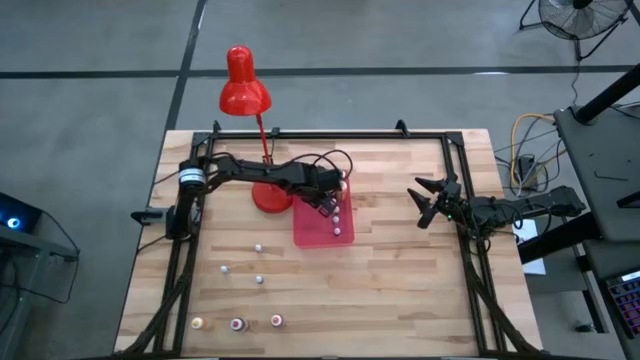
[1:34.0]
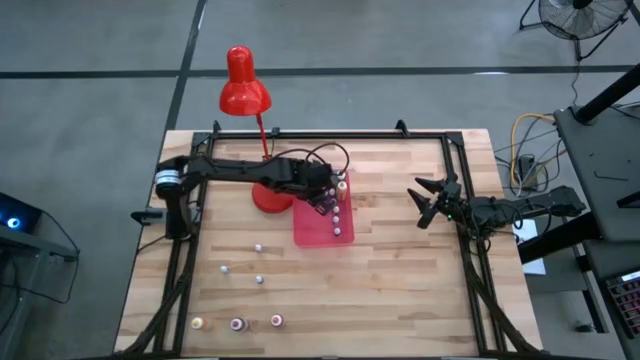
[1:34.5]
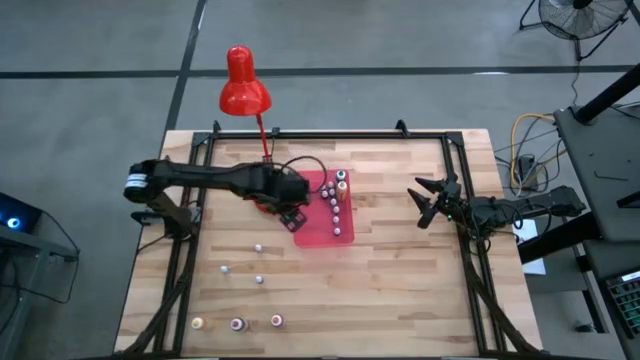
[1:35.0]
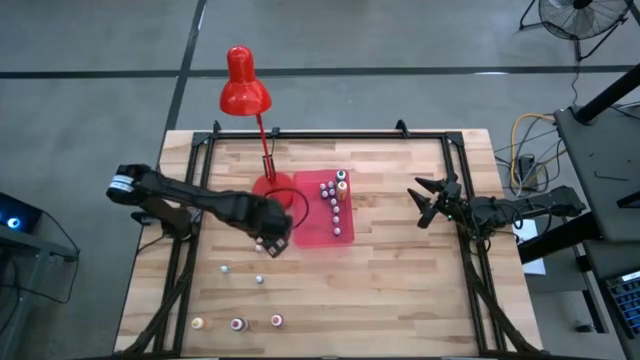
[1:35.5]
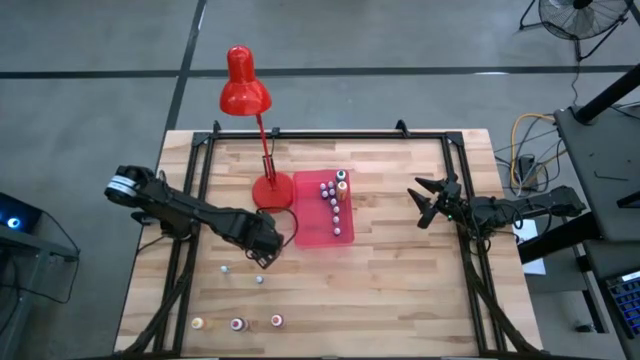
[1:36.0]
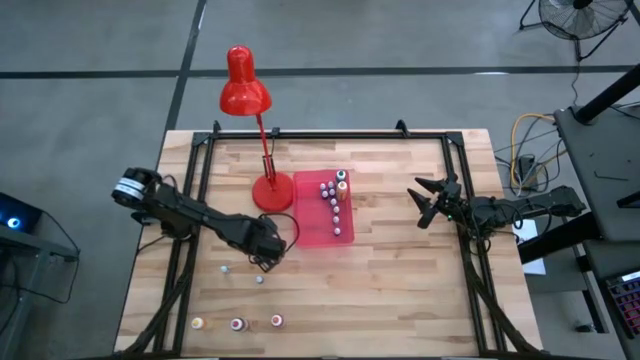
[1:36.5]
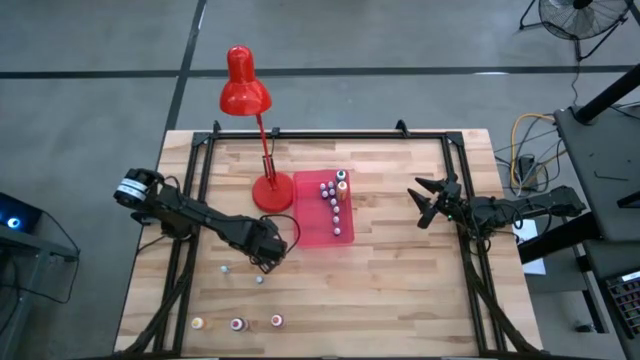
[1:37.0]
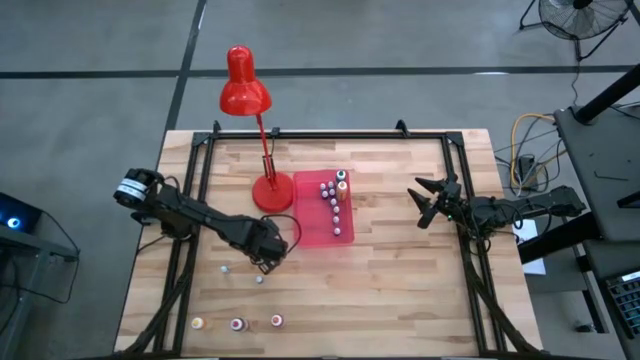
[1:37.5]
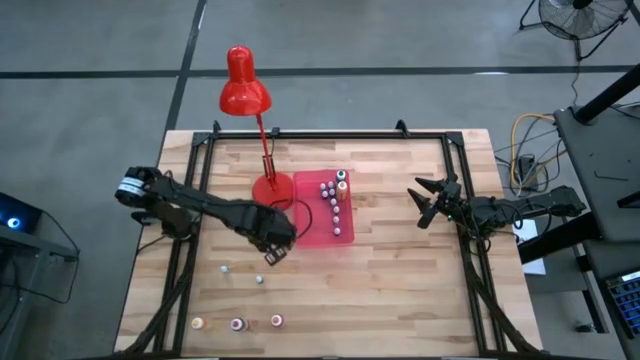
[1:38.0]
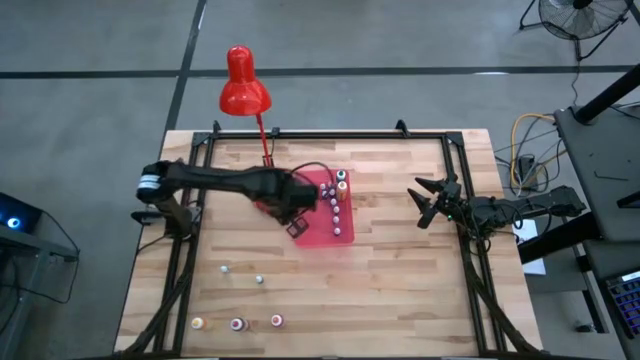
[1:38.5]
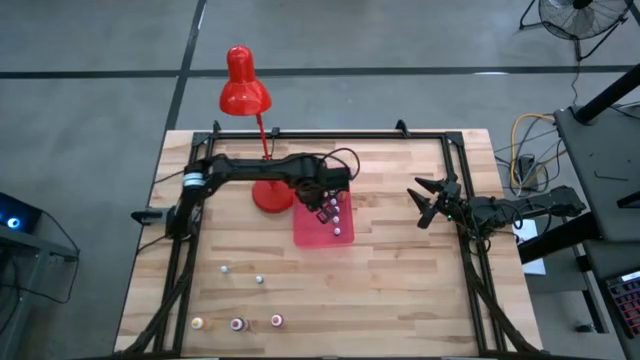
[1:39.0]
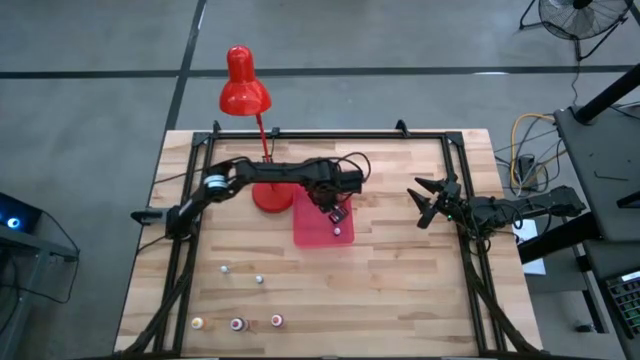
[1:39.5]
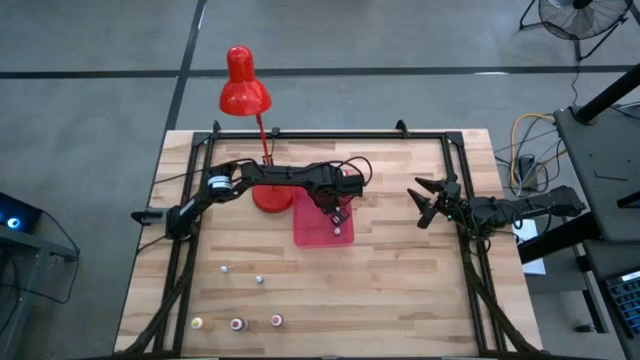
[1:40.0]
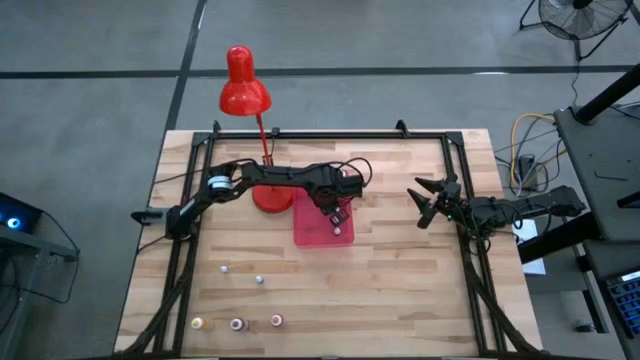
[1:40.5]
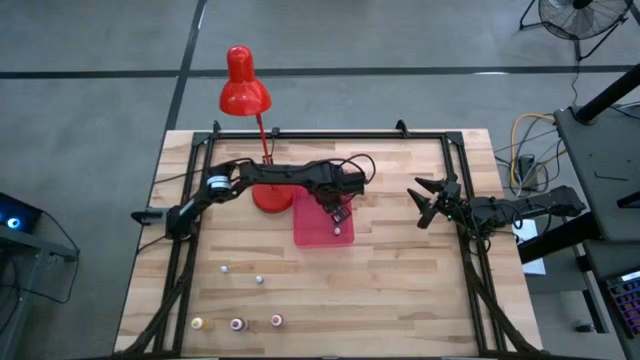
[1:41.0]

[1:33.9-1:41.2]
Task: Pick & Place food coloring
Put the small red food coloring bottle into the bin

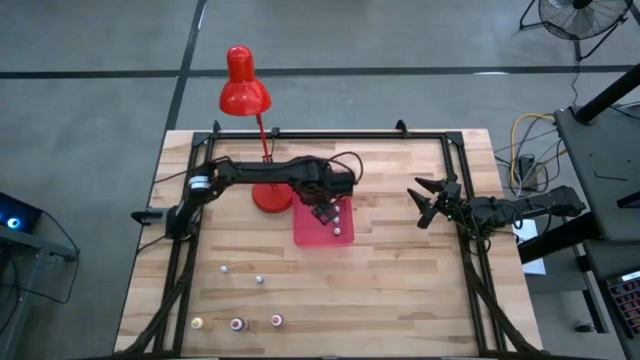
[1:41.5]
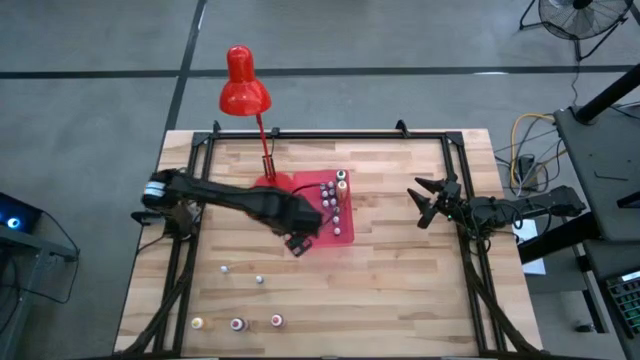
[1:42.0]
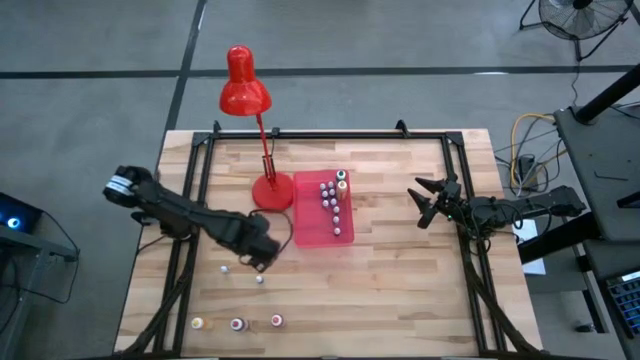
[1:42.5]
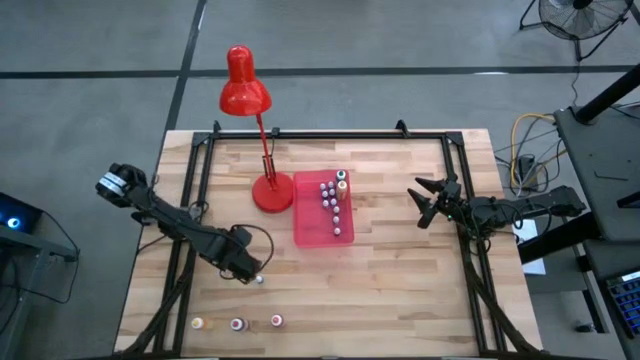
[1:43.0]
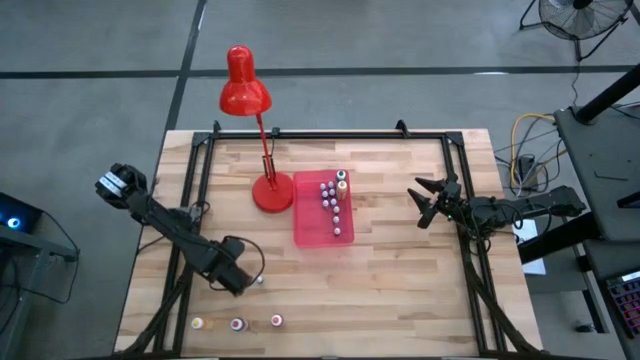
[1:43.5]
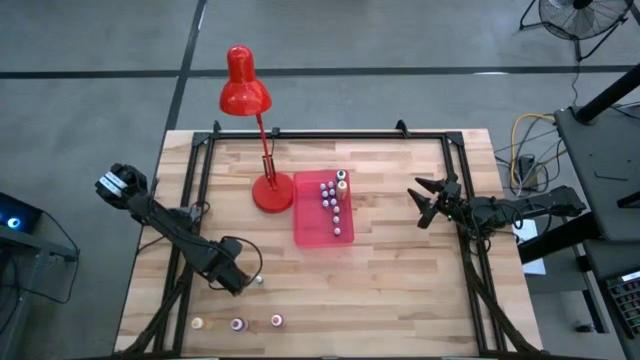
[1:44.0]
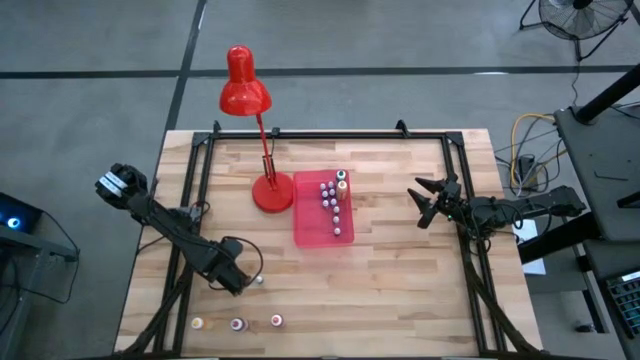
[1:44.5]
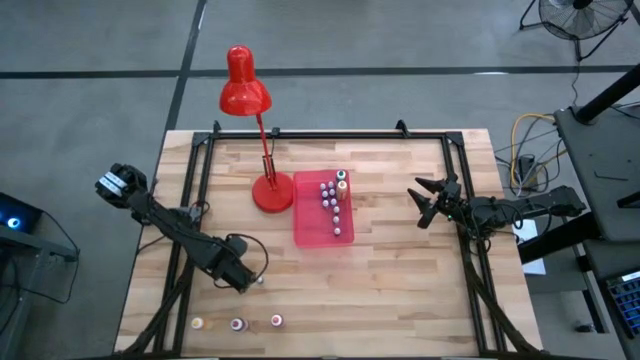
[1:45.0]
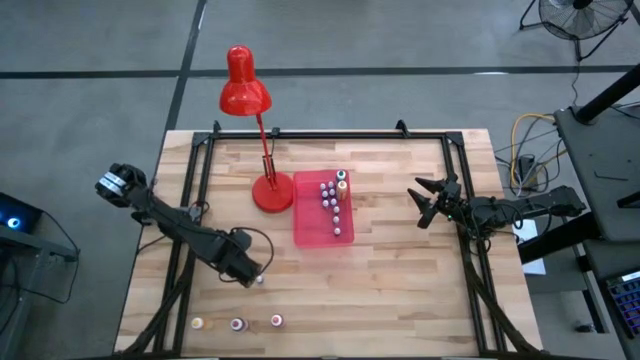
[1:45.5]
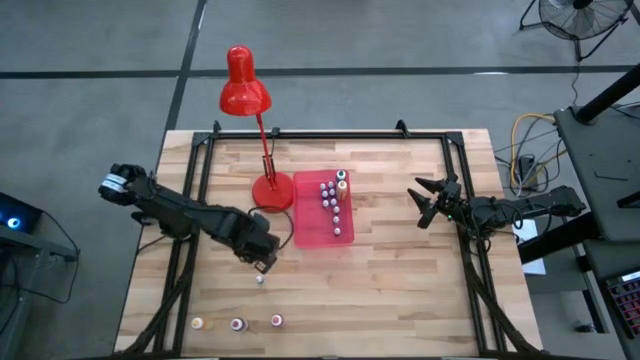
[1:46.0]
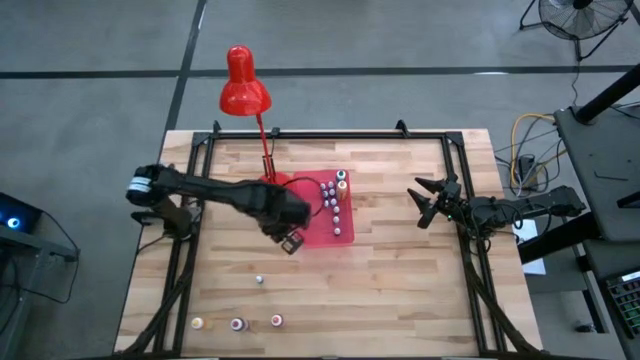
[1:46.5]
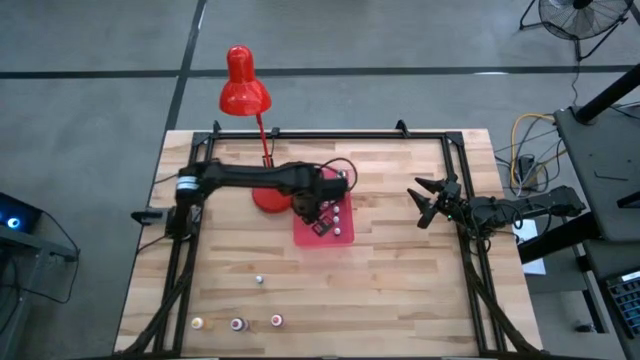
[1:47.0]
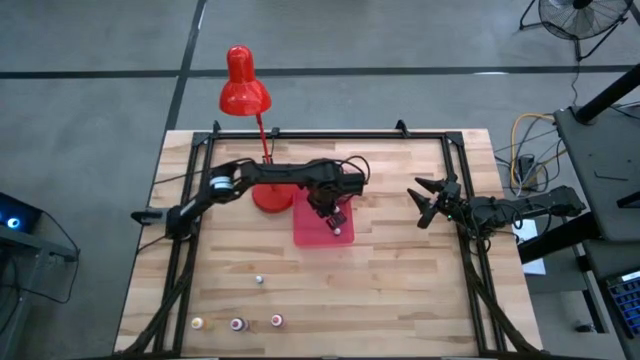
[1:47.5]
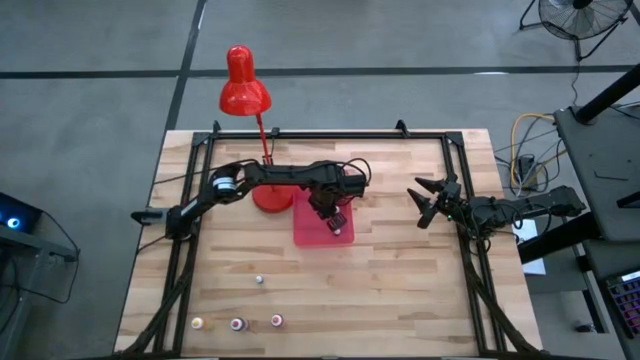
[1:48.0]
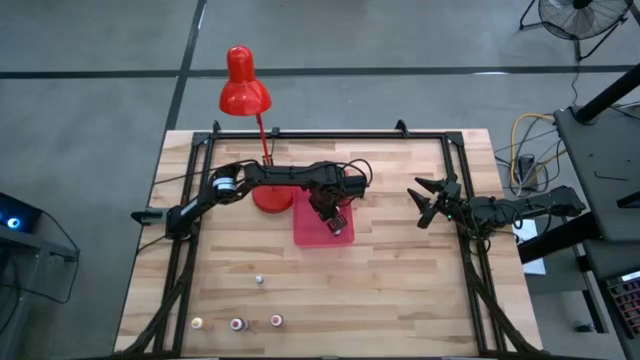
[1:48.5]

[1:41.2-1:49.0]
Put the small black food coloring bottle into the bin

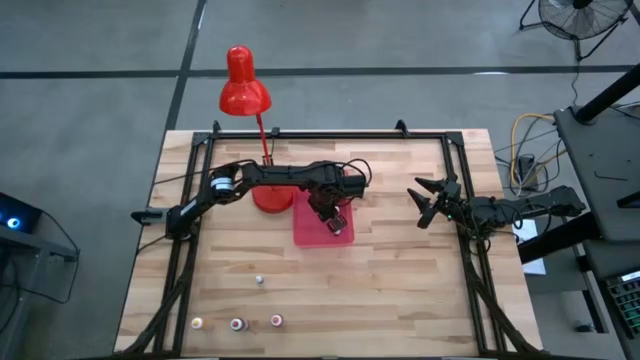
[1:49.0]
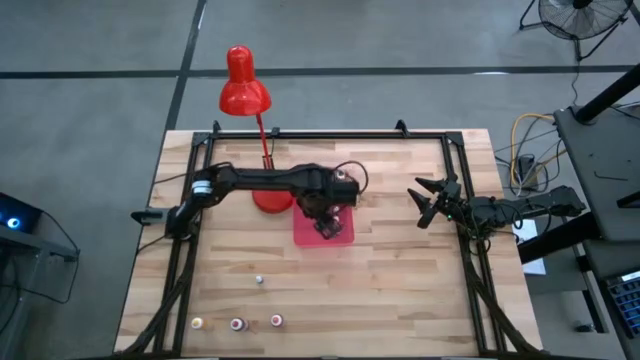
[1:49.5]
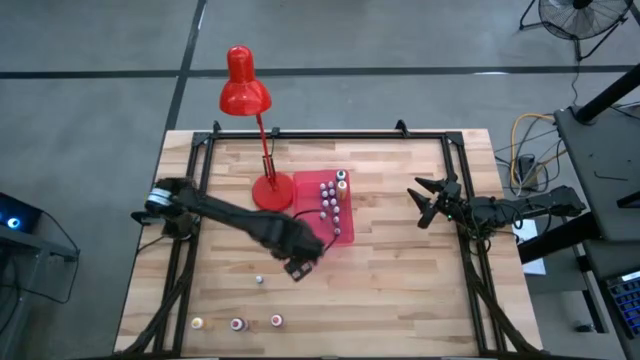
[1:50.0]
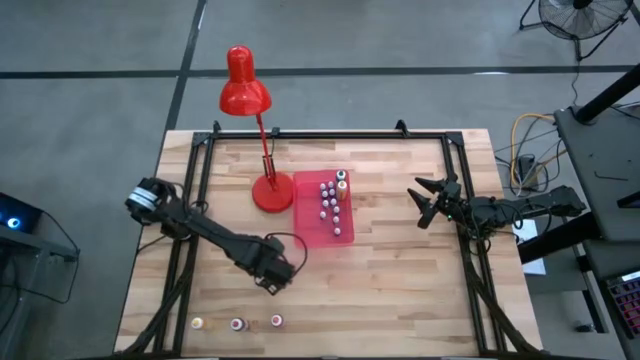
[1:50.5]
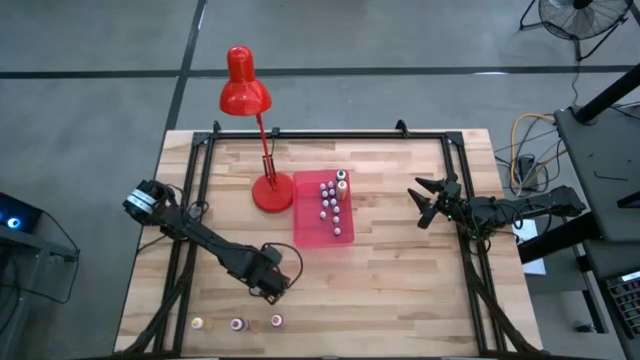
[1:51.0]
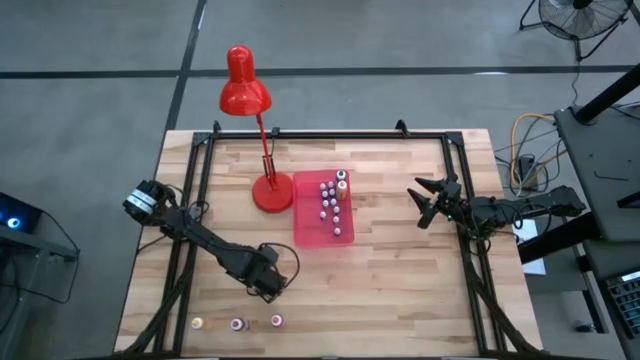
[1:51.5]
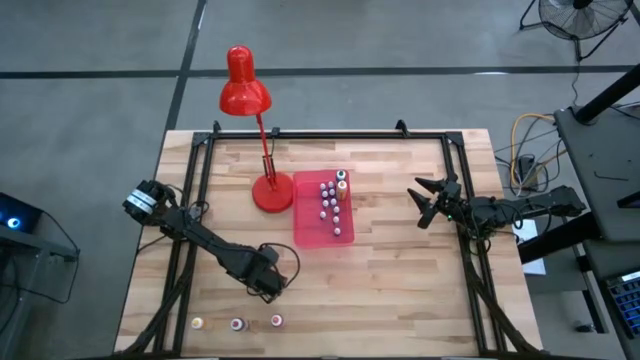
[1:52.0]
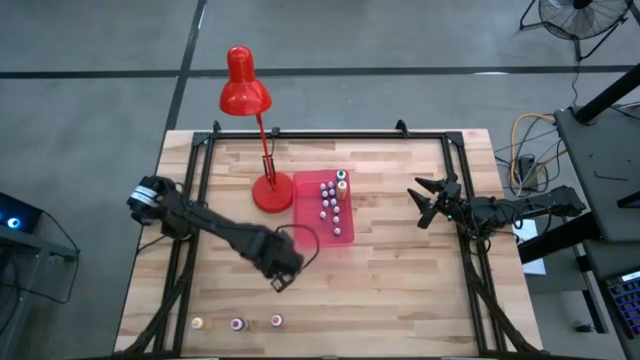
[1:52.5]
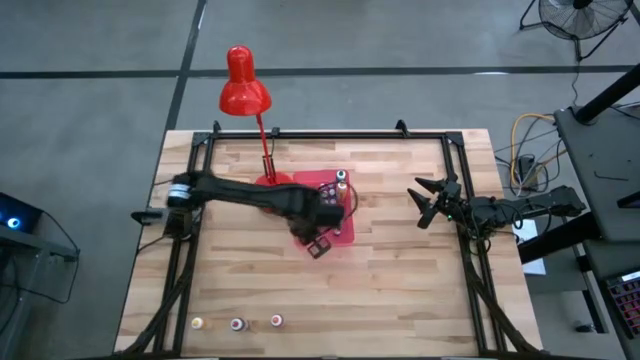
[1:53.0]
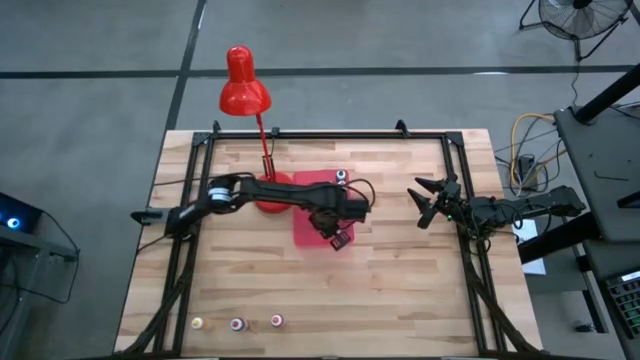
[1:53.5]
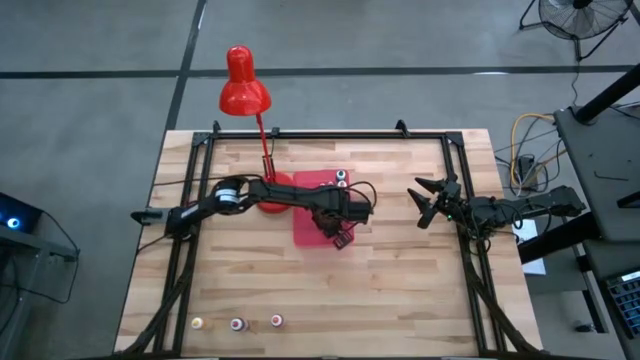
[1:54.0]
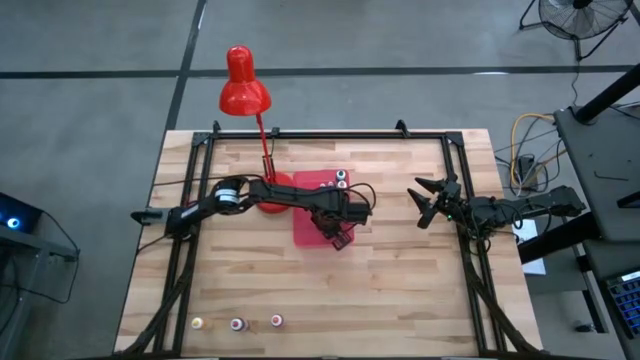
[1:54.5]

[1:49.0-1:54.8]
Put the small violet food coloring bottle into the bin

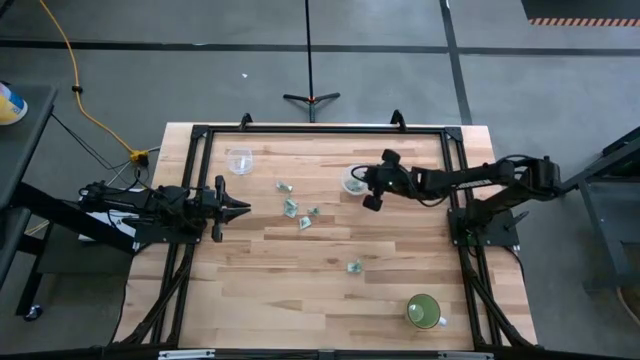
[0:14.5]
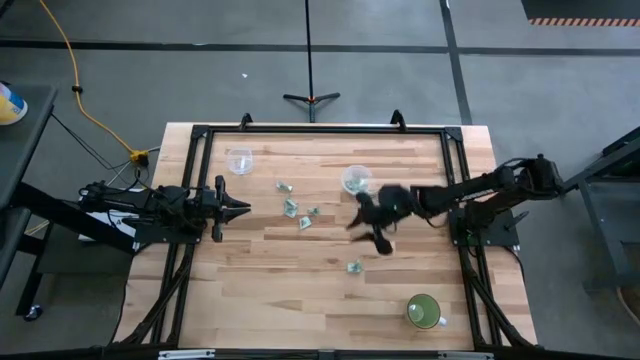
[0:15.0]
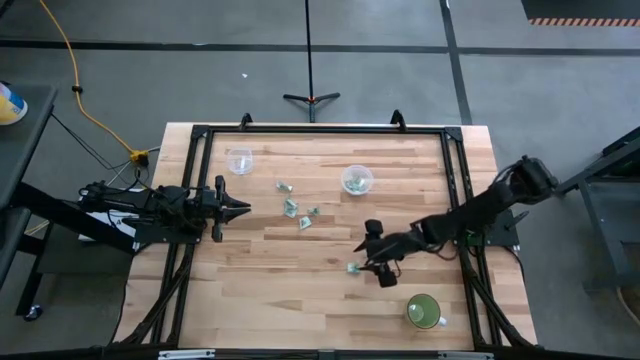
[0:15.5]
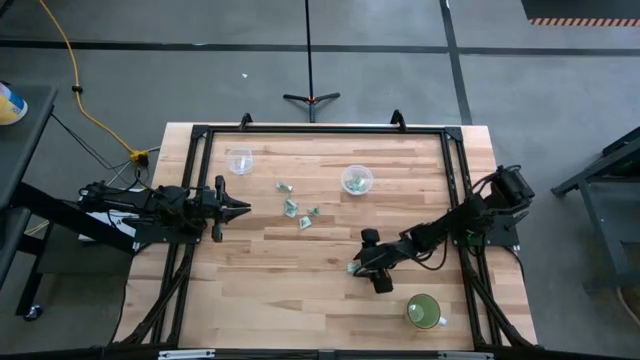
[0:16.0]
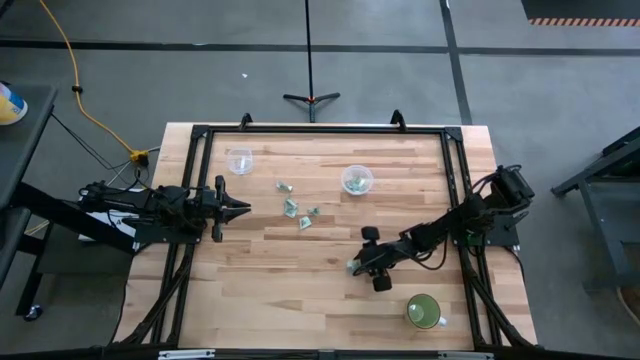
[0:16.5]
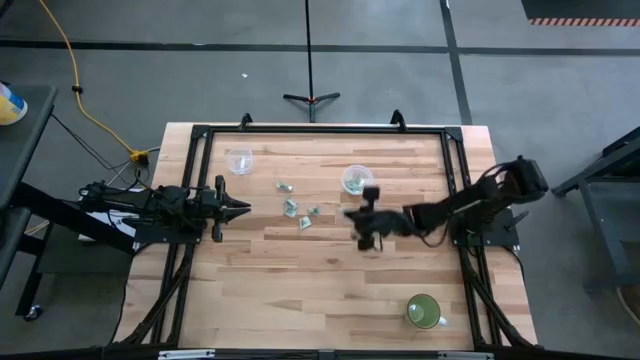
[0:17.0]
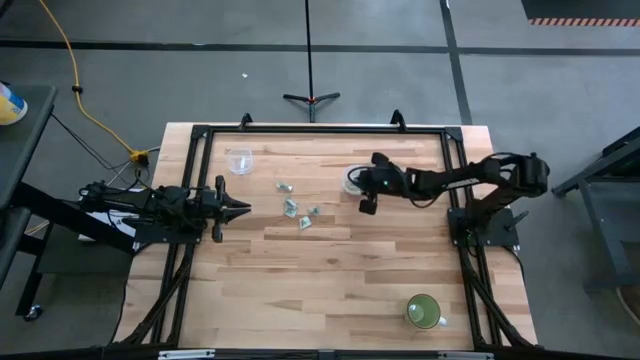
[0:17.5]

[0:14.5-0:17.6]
Task: Pick and place Stevia / Truvia into bins
Put the stevia packet into the bottom transparent container
